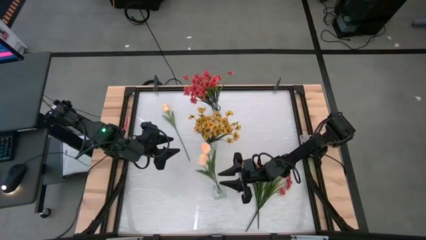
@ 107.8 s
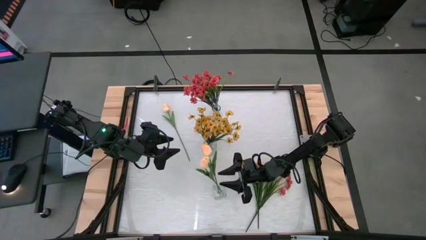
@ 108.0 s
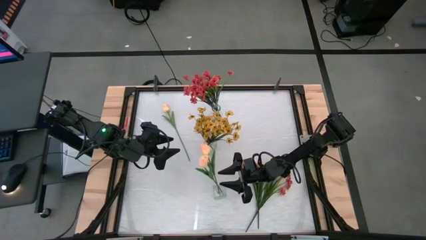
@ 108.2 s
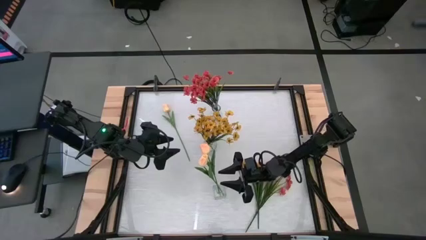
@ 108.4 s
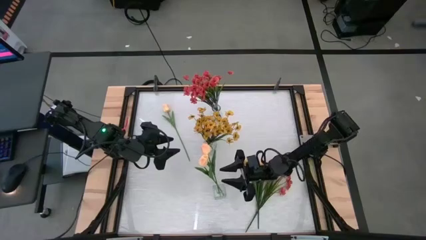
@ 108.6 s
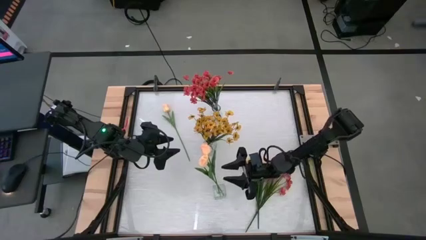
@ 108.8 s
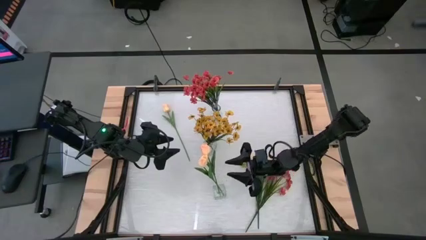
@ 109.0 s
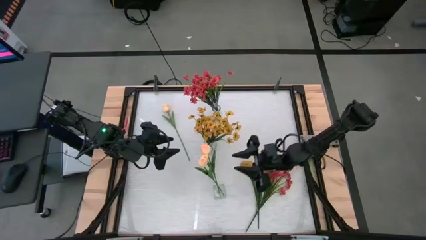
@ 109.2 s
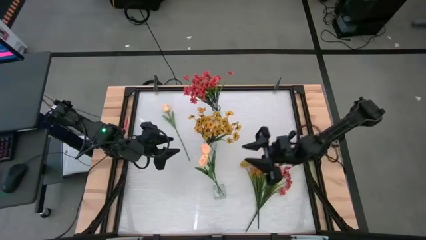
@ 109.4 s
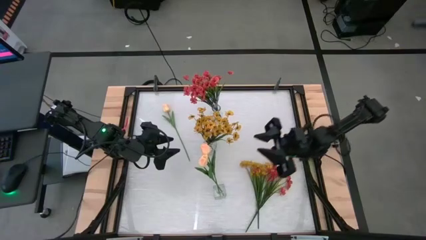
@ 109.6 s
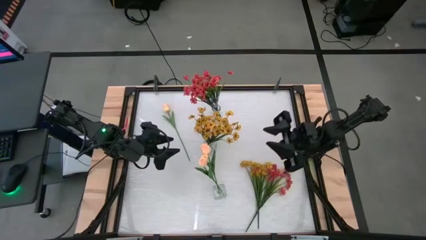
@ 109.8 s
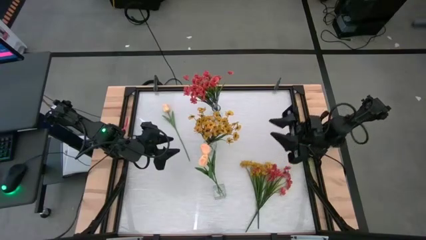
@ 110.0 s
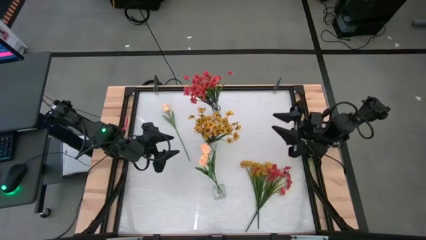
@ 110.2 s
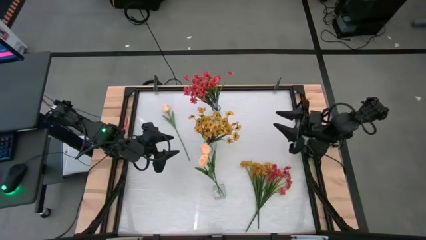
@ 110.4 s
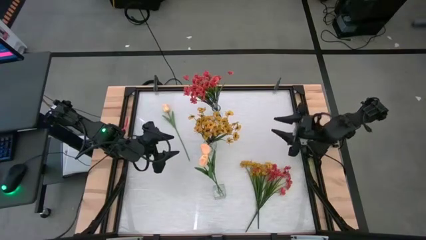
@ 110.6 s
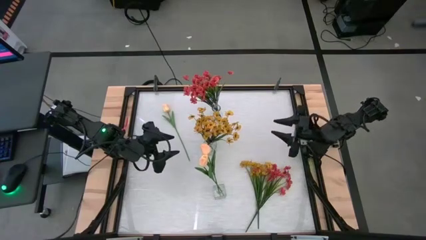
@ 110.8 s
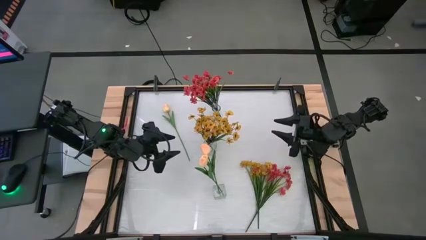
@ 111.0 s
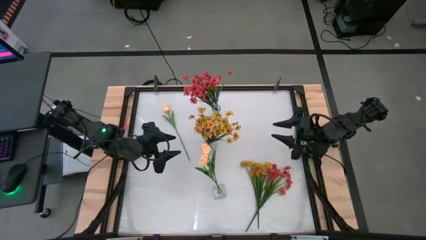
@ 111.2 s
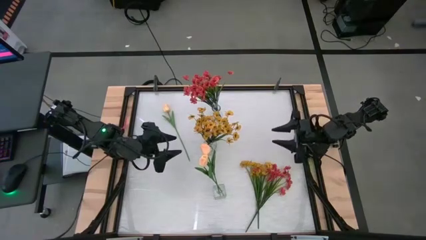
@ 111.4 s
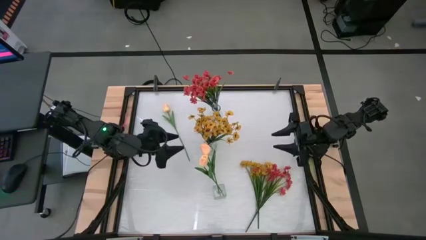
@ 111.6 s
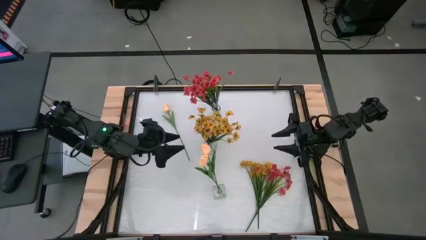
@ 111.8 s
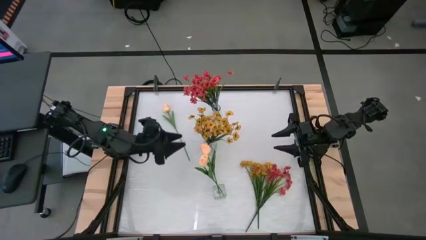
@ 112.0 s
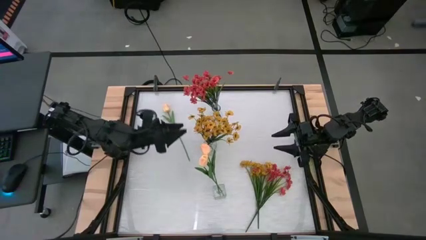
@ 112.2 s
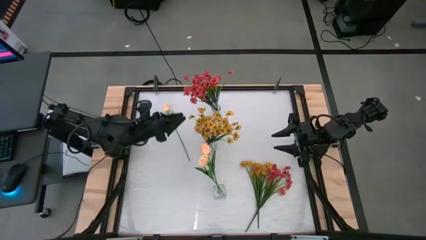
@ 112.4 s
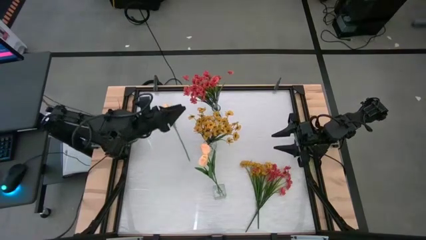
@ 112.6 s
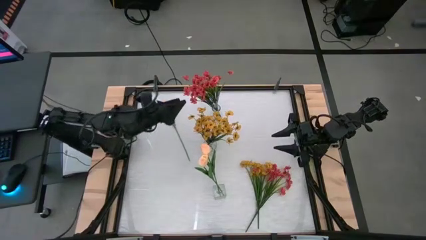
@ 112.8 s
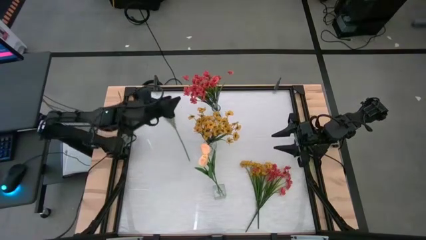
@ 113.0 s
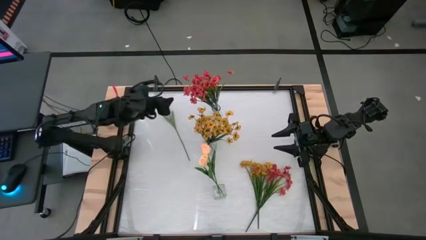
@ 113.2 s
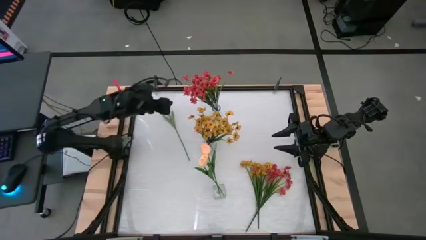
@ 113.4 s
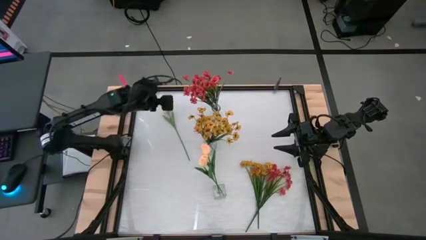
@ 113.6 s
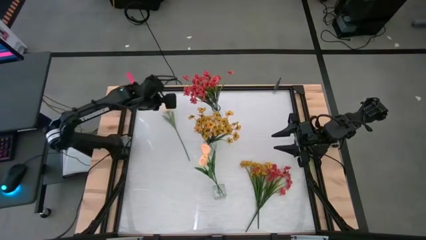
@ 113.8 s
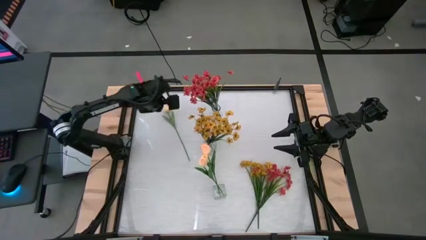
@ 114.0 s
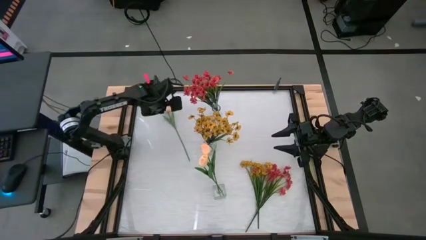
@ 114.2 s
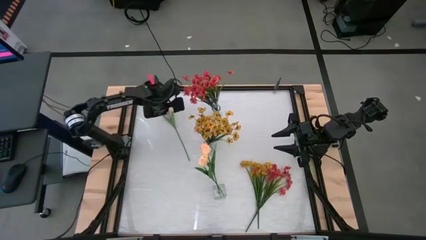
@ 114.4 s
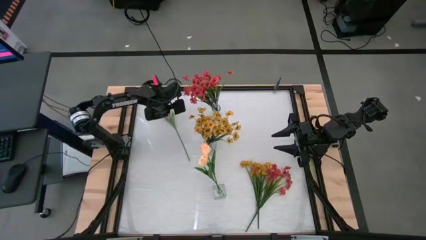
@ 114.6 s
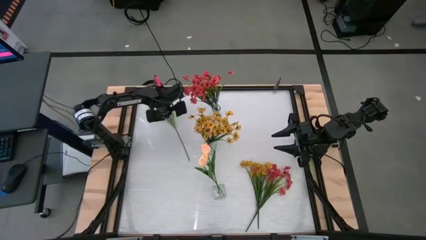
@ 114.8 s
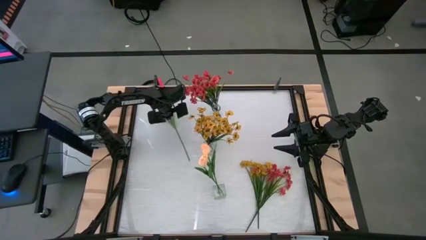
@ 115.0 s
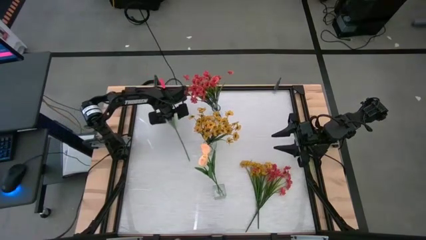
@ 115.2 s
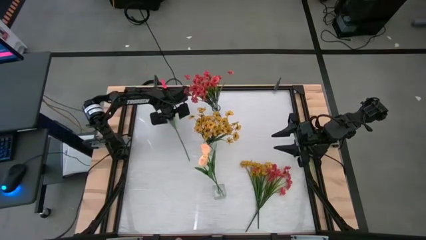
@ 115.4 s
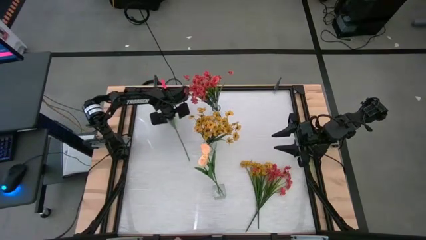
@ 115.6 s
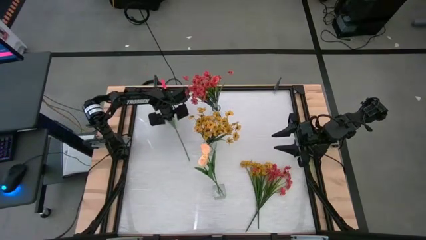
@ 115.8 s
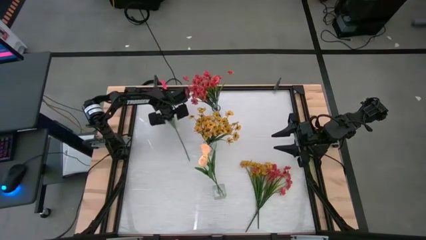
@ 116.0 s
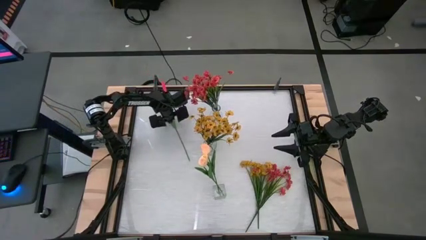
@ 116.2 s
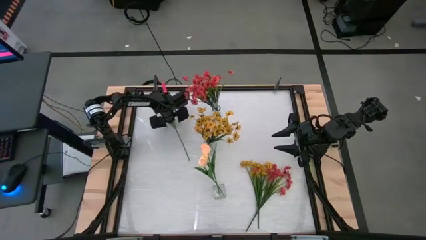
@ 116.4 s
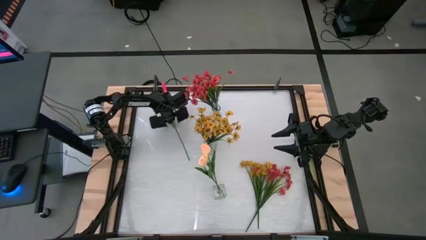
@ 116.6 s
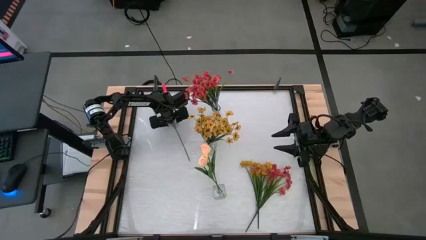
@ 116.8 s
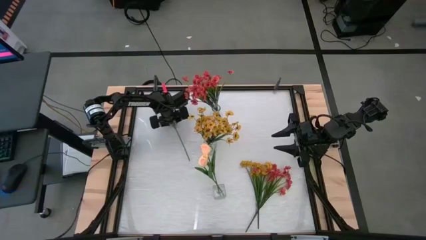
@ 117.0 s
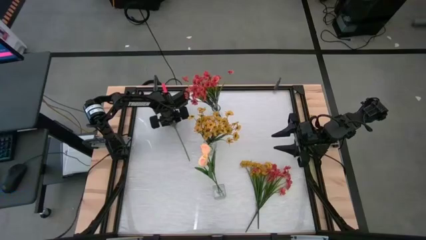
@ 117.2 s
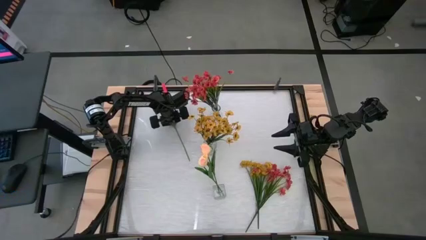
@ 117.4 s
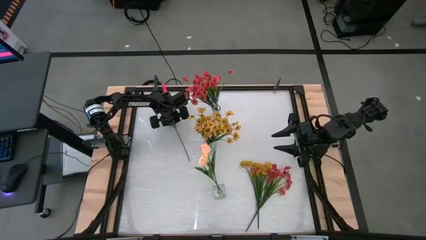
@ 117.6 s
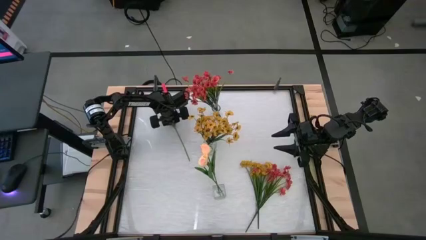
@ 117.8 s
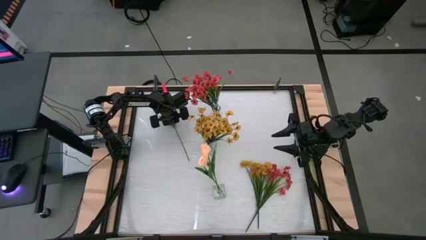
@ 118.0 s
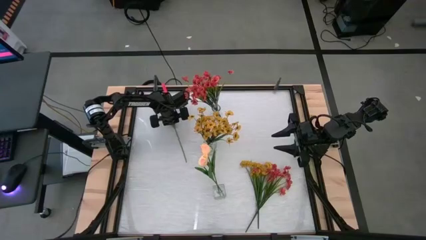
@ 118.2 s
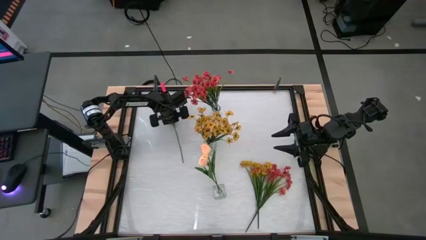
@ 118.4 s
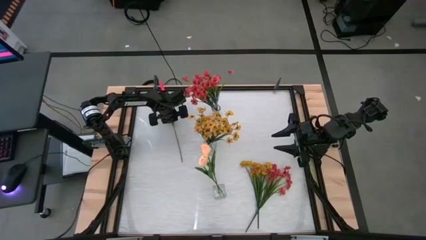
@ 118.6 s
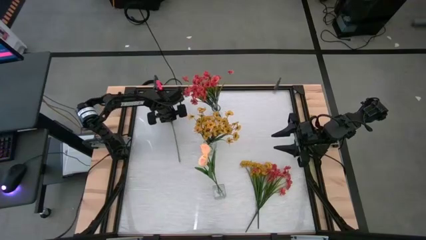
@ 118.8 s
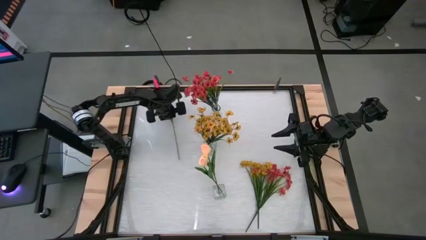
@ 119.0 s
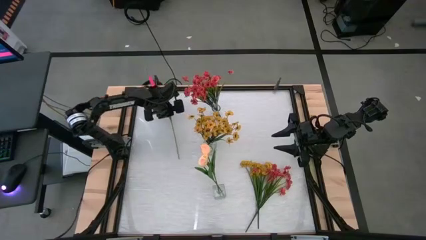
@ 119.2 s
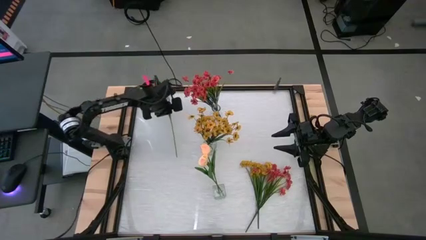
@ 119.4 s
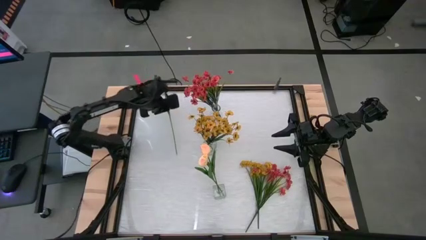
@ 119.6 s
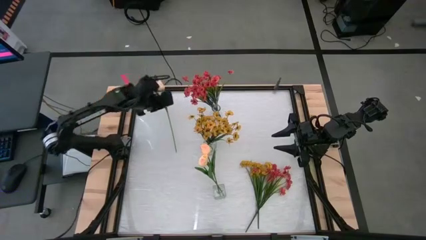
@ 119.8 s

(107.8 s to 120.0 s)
Task: Sort flowers into vase by color
Put the orange flower into the bottom transparent vase

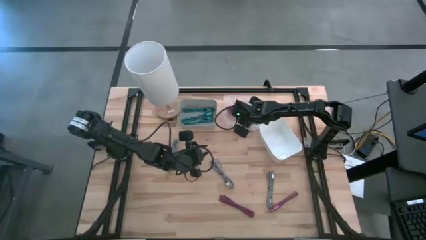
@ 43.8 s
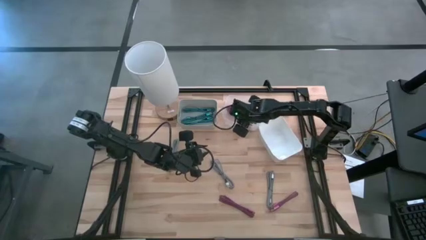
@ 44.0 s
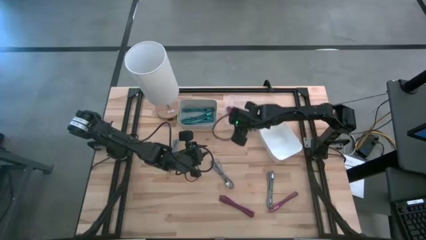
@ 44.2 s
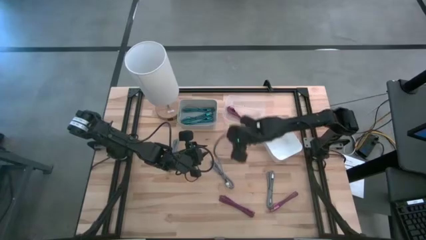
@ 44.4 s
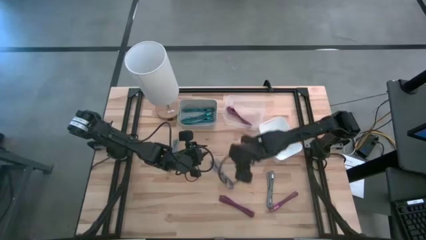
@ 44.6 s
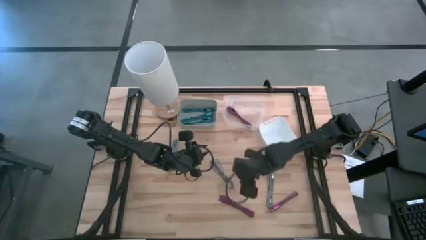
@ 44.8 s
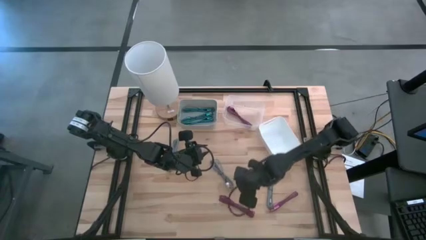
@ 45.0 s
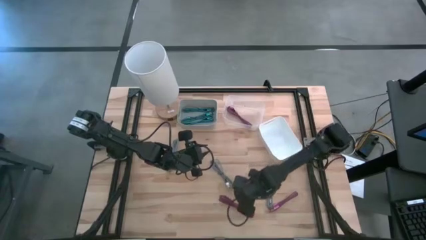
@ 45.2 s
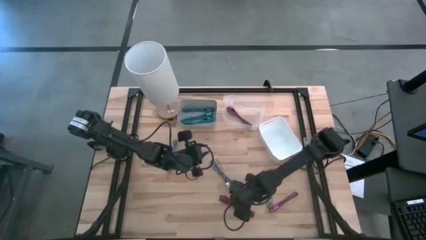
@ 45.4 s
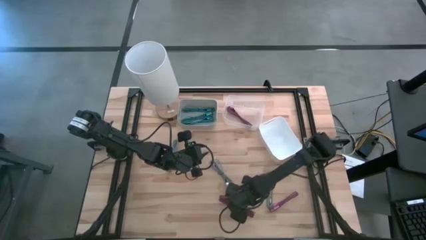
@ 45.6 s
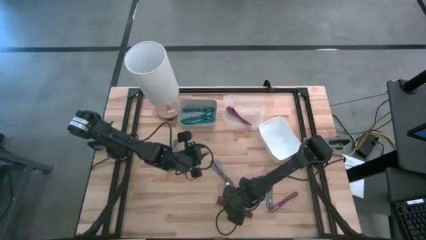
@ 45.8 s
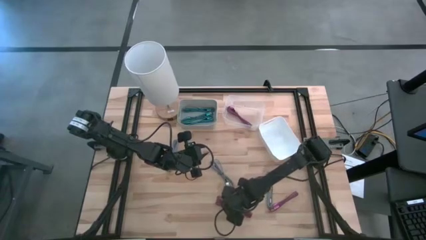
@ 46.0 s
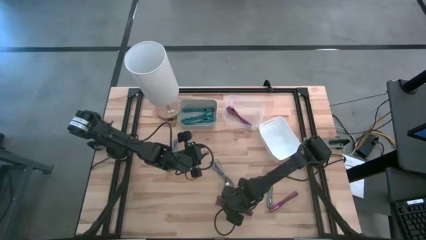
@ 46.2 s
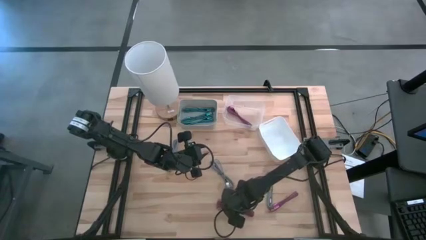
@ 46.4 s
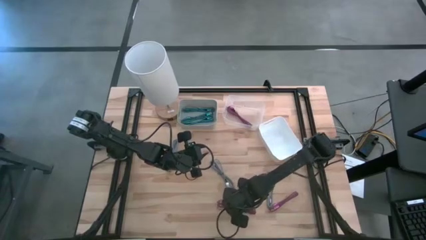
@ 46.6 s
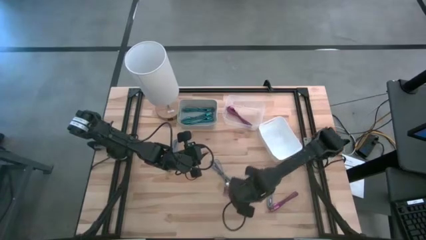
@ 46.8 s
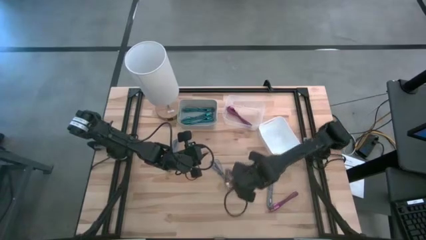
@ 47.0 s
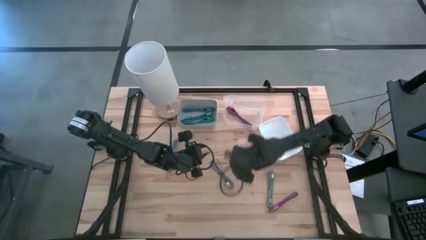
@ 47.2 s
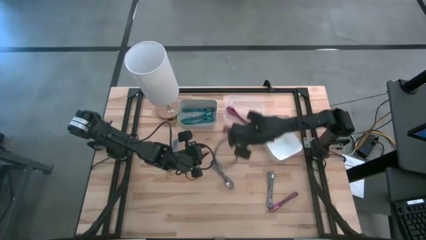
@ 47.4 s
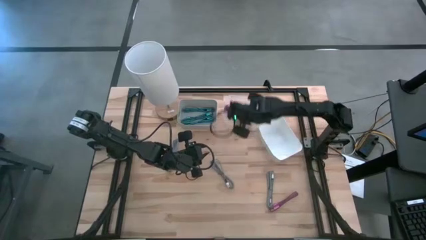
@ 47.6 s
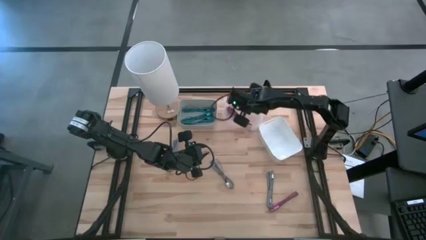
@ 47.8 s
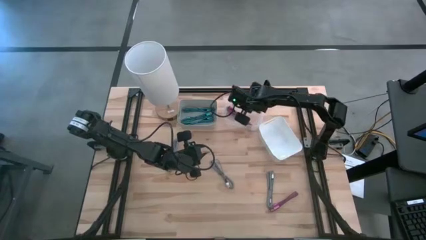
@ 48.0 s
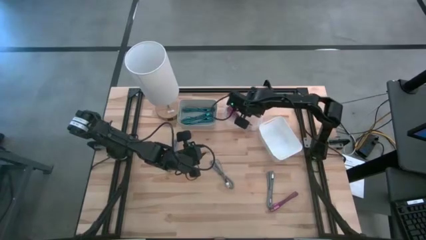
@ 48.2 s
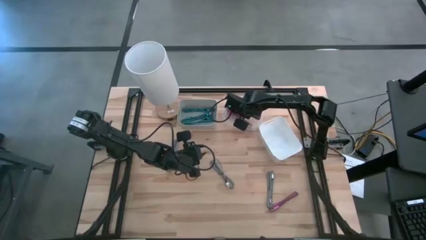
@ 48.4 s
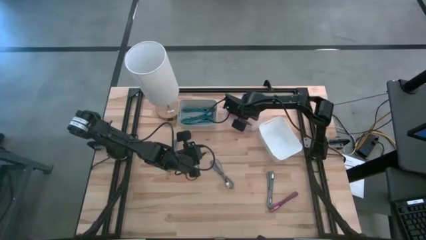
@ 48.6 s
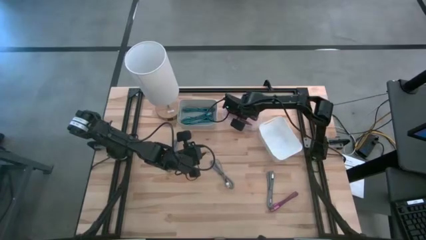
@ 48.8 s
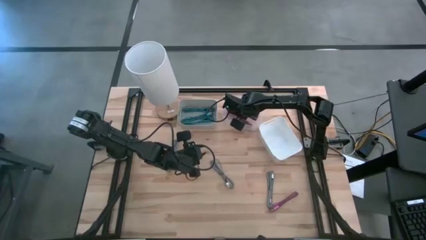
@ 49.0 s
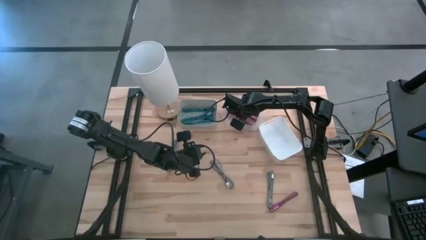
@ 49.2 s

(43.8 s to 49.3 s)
Task: Pick & Place USB Port
Put the left black and pink USB cable into the transparent bin
